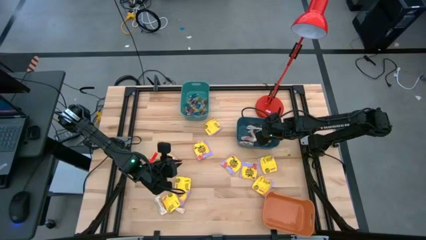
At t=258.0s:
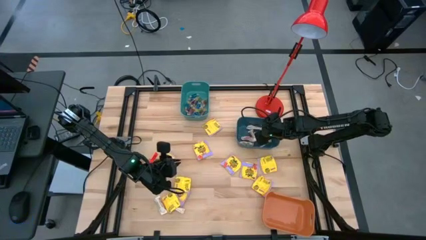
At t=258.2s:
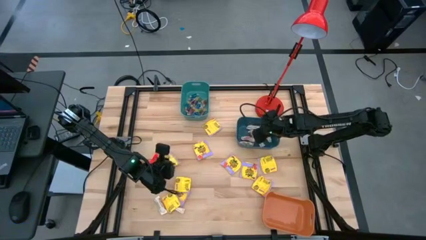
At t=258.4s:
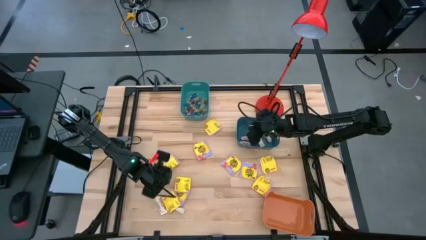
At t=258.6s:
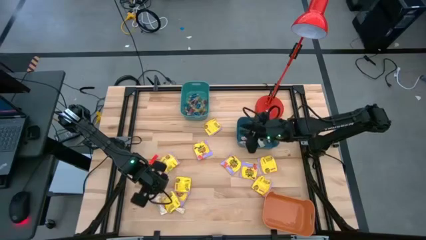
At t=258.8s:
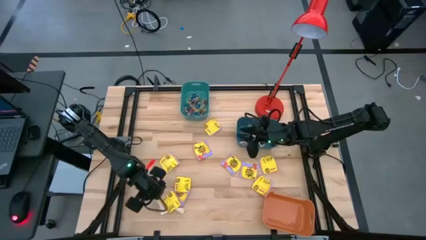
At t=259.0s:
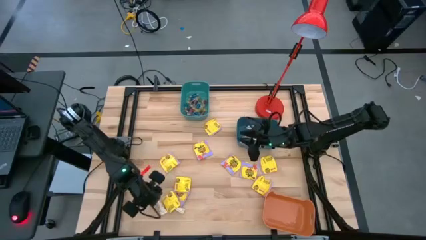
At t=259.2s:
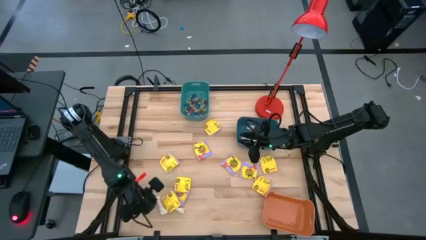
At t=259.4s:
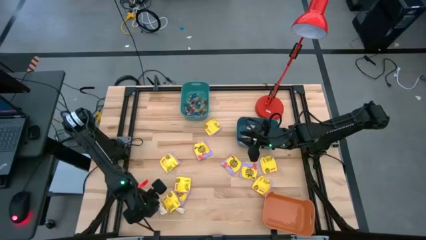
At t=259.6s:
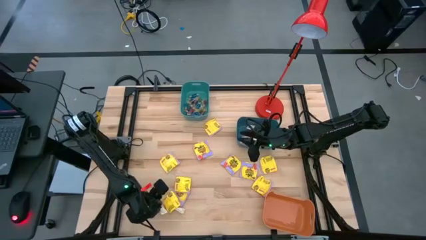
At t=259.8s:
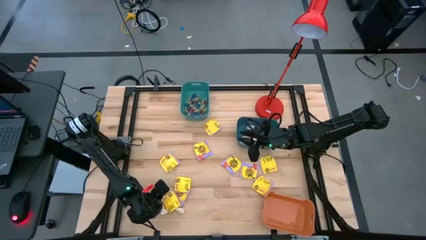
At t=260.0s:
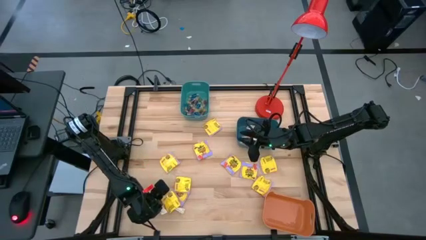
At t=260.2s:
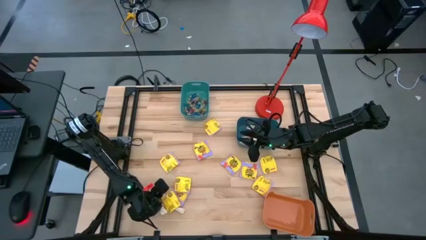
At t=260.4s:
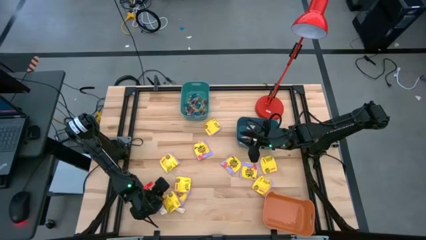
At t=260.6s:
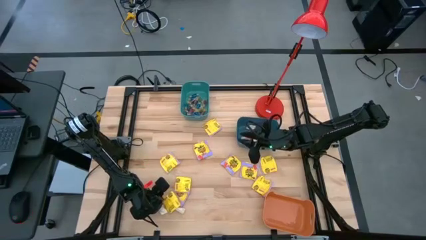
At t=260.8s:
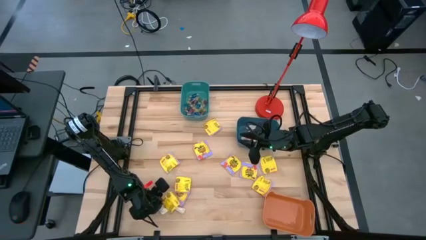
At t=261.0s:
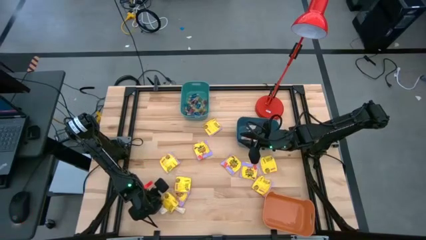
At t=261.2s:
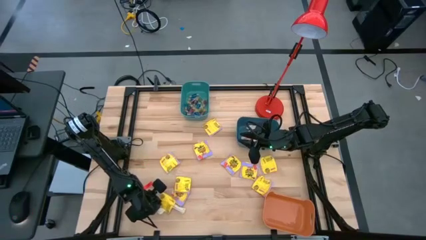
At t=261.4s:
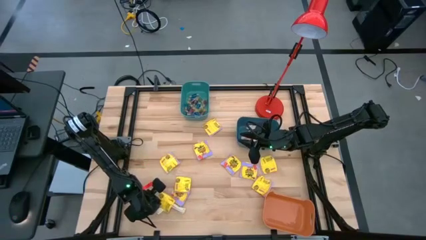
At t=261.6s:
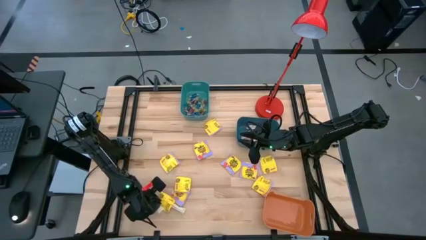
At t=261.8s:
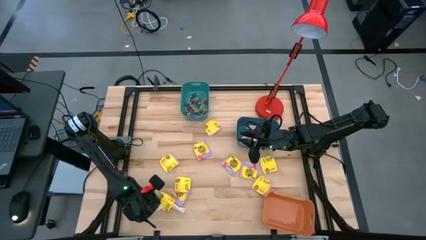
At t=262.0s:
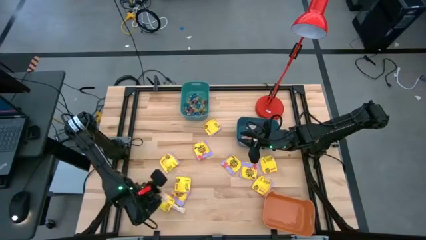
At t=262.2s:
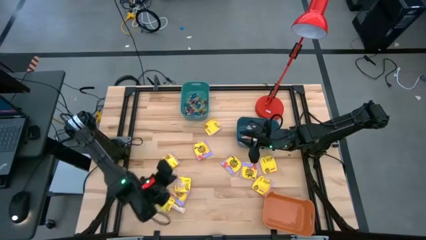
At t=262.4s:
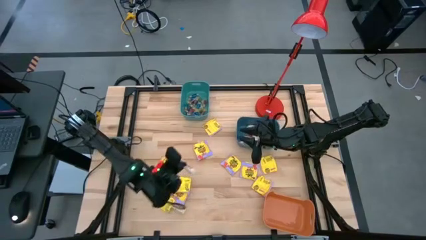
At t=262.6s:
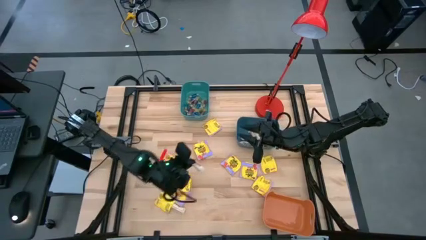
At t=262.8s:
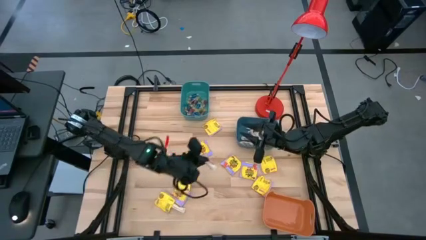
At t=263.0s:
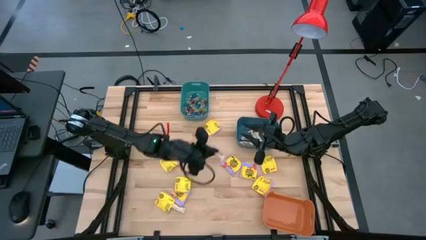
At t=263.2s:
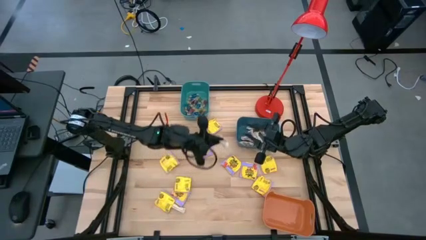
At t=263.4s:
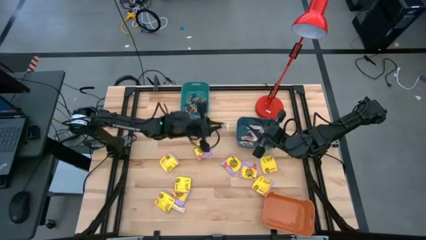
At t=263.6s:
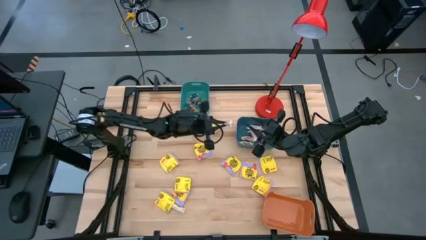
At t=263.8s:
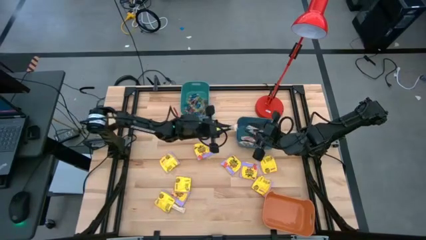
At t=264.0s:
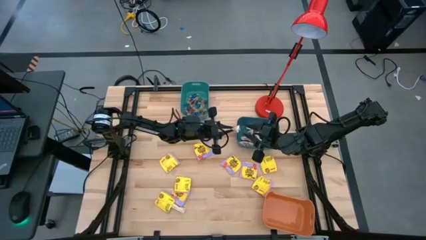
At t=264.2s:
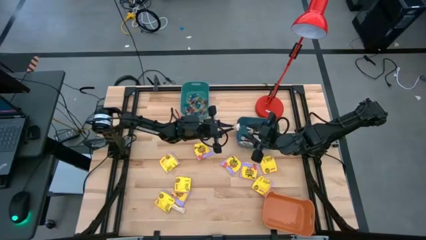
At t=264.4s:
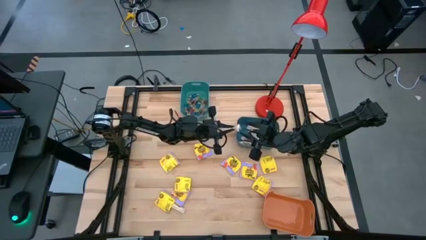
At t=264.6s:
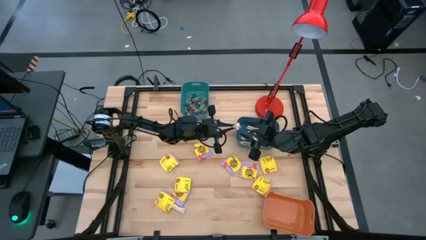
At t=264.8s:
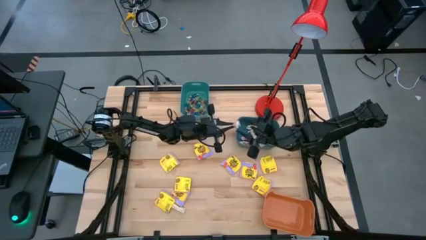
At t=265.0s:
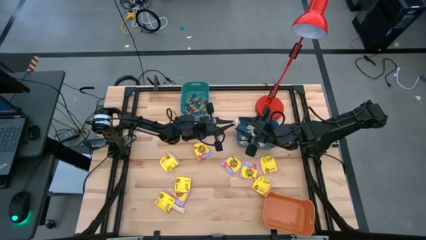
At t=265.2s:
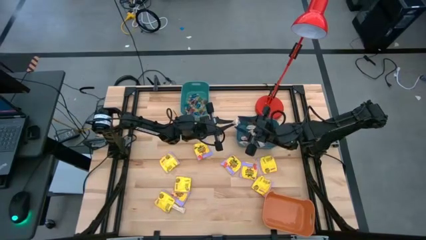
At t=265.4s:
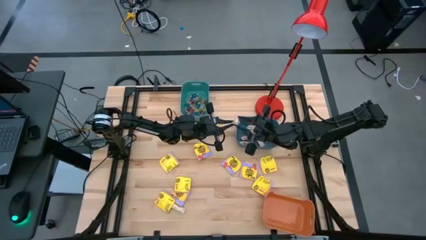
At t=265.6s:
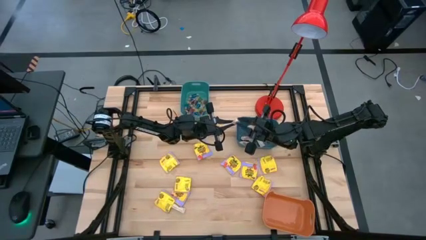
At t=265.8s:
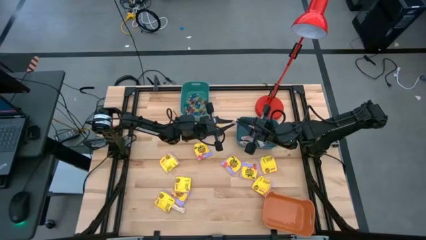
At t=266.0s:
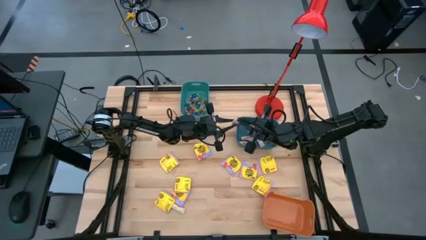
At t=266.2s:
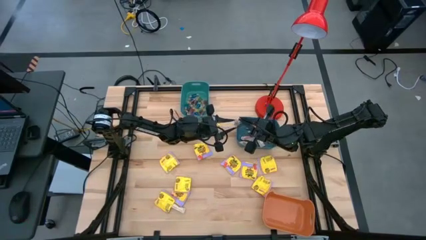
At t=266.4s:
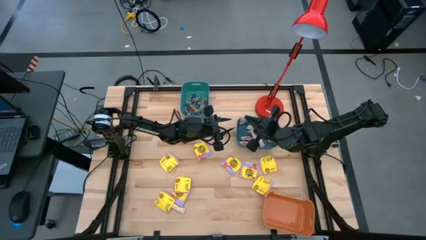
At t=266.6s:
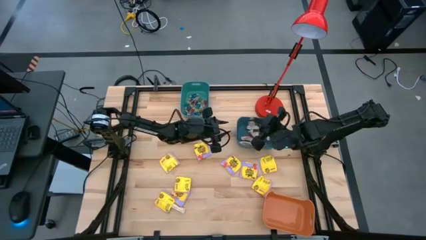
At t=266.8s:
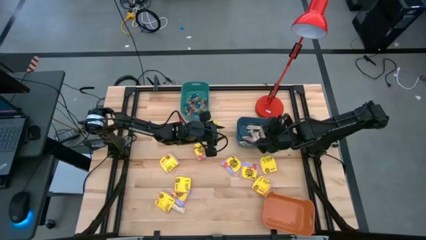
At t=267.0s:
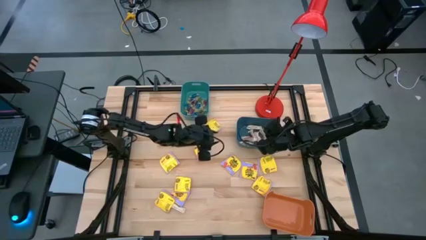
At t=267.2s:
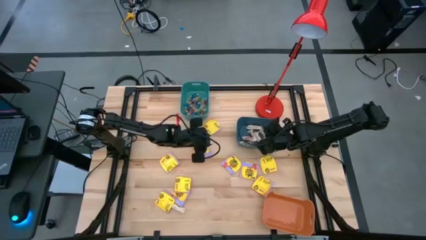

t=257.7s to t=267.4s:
Task: Sort candy
Put the white chocolate bar into the blue bin

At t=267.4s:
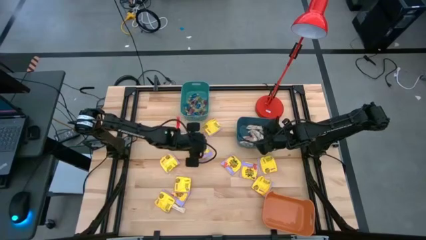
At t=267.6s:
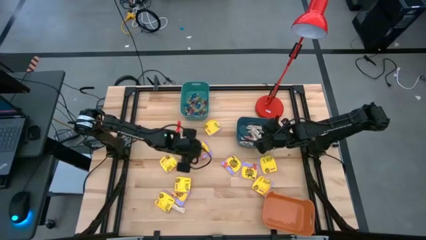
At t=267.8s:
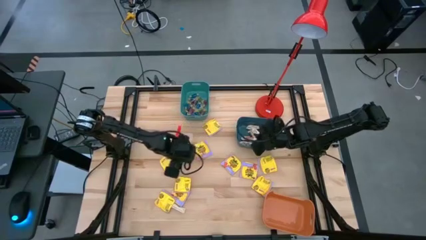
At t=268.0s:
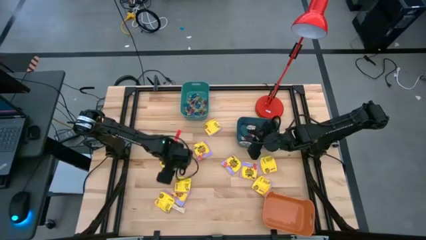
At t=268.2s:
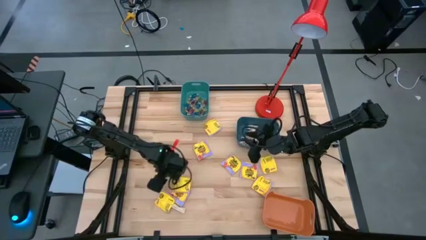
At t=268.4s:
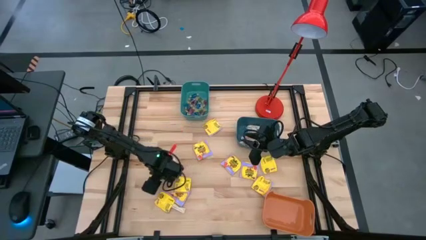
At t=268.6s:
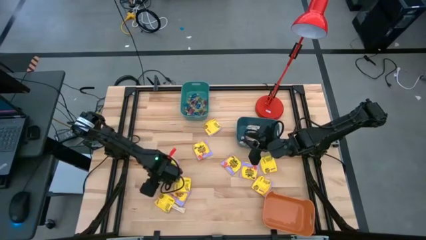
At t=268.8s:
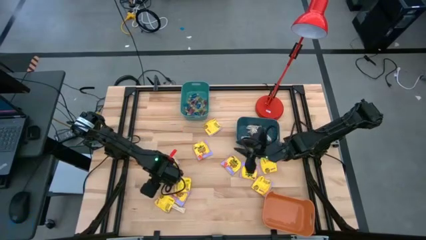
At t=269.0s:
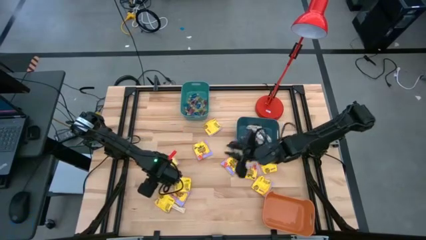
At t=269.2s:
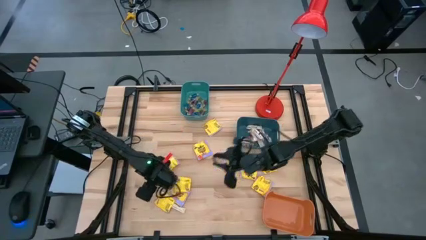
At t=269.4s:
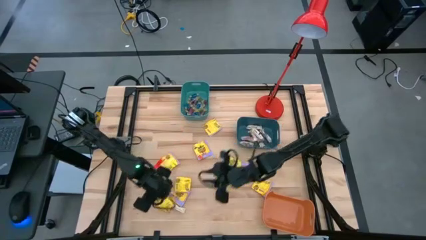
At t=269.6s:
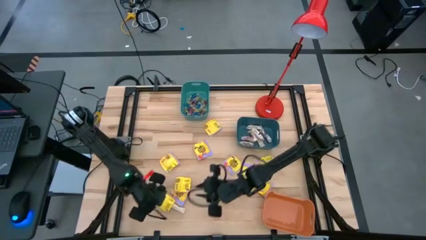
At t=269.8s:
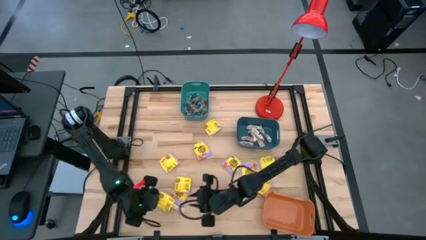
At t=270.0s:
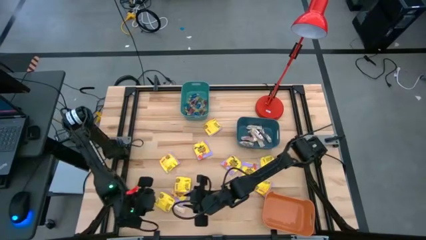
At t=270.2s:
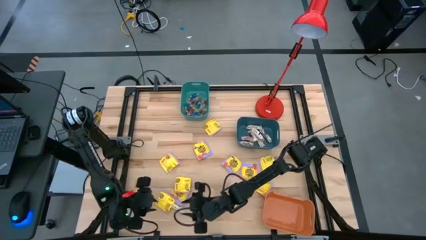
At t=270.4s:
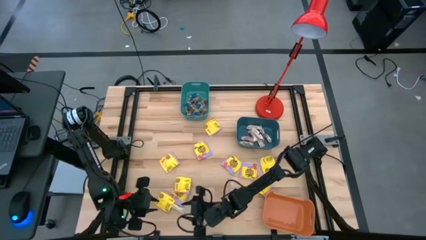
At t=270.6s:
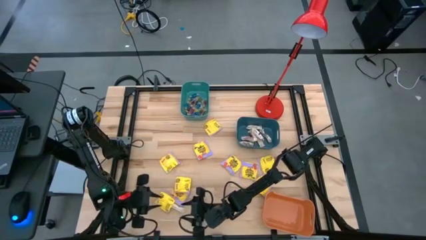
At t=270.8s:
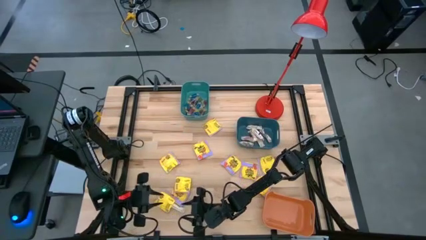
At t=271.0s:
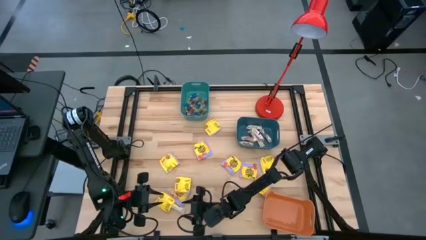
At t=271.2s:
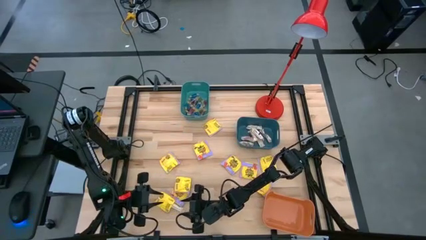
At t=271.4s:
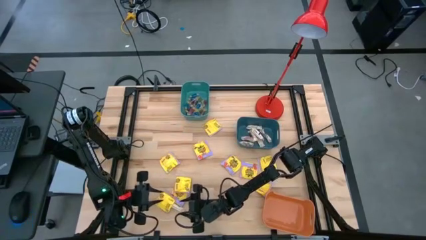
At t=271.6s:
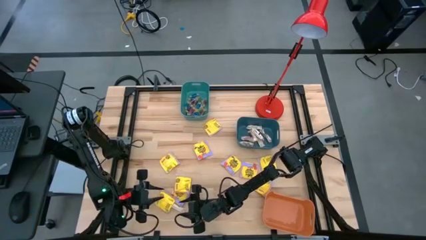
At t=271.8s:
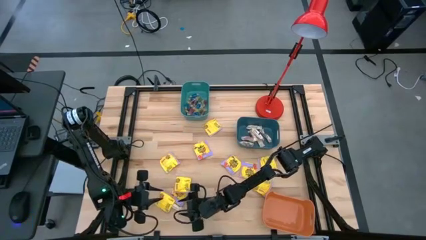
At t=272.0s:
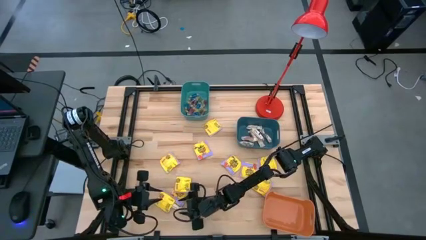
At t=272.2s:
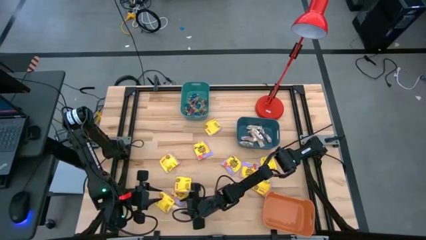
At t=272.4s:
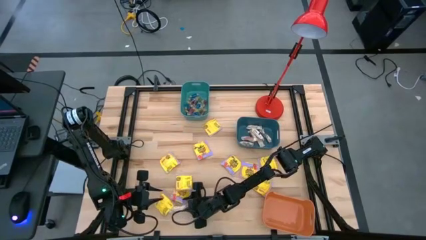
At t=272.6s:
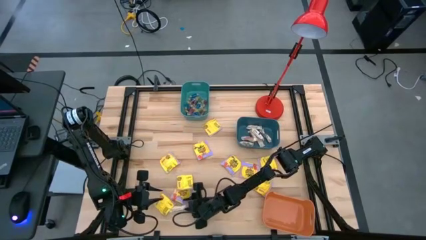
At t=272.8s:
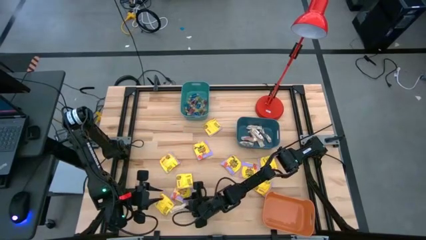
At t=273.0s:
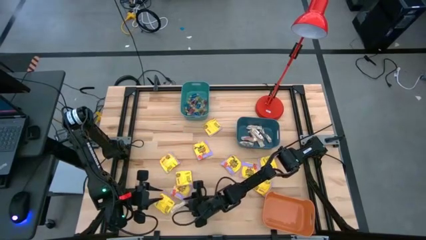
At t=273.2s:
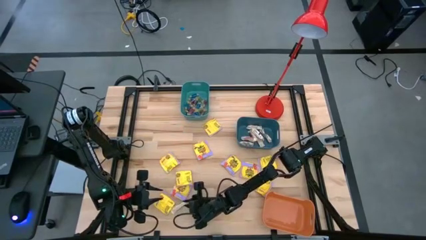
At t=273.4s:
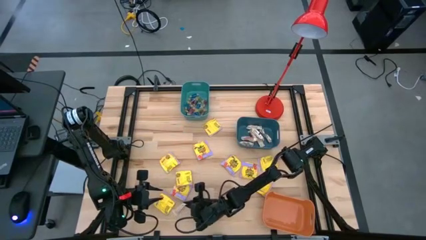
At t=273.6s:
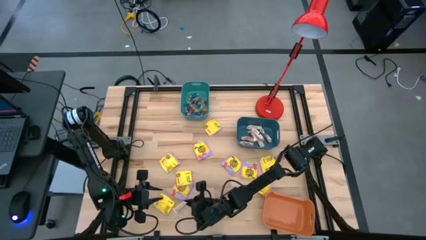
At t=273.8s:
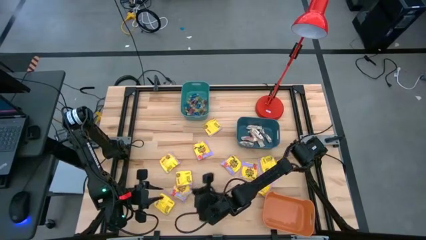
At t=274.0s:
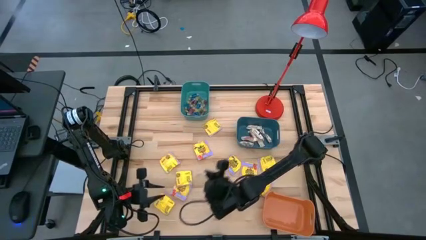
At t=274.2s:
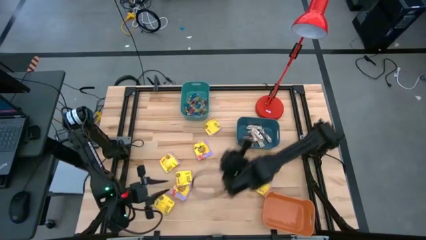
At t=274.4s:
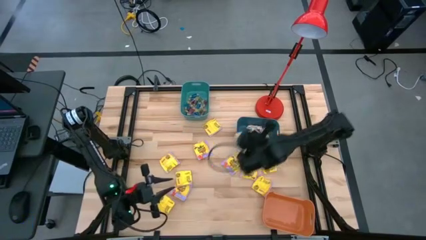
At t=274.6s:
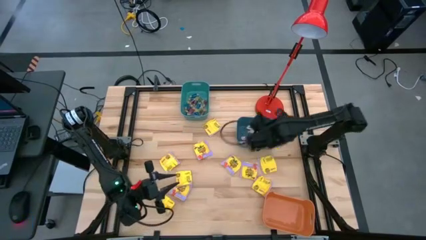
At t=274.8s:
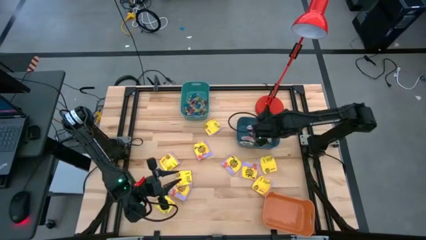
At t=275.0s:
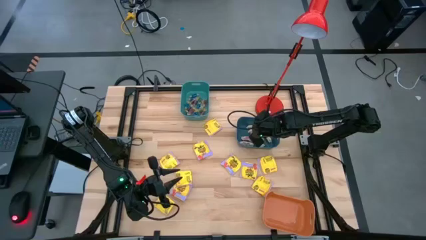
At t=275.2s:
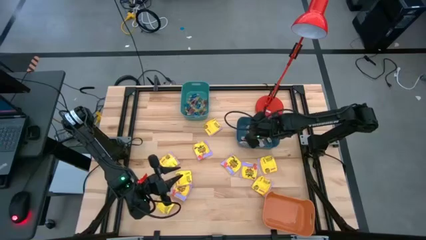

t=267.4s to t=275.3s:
Put the white chocolate bar into the blue bin
